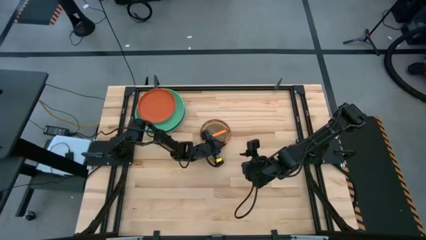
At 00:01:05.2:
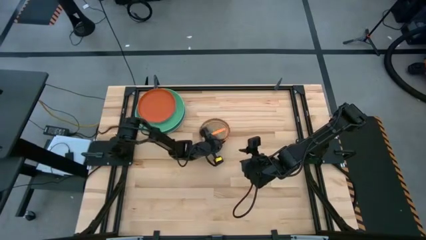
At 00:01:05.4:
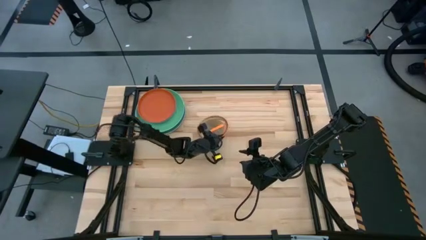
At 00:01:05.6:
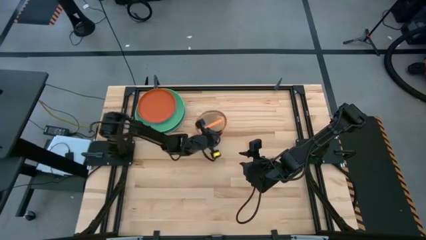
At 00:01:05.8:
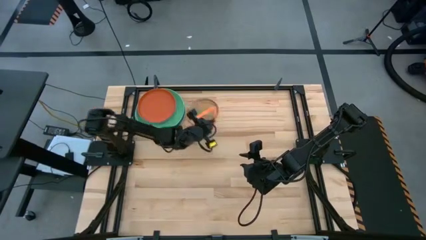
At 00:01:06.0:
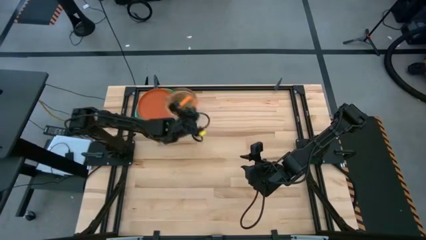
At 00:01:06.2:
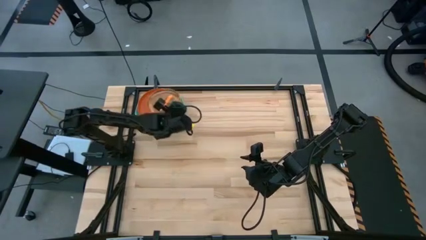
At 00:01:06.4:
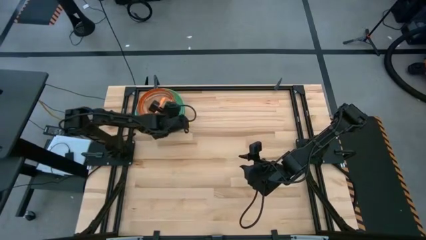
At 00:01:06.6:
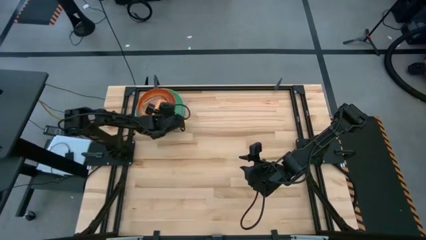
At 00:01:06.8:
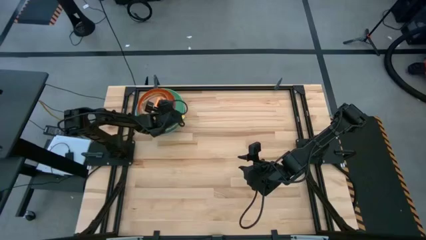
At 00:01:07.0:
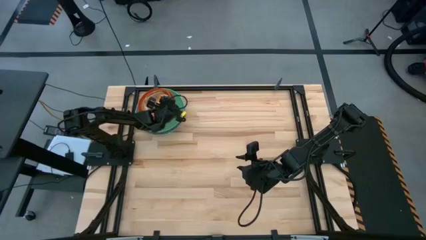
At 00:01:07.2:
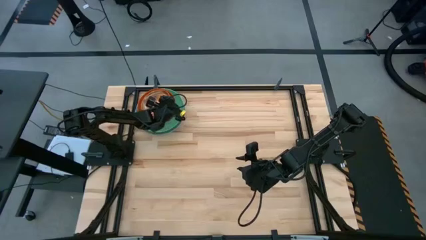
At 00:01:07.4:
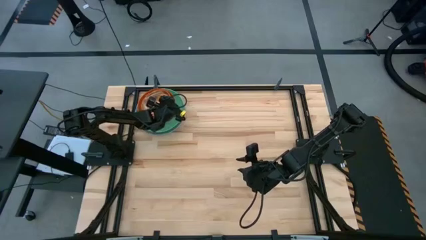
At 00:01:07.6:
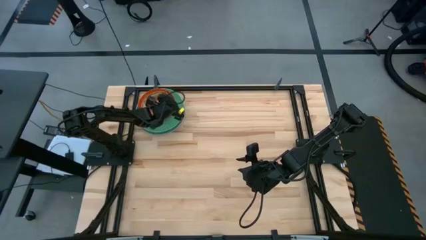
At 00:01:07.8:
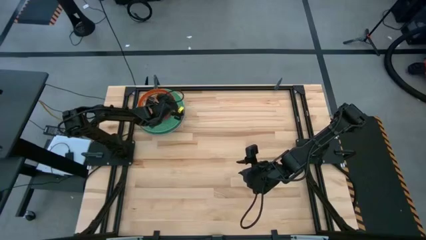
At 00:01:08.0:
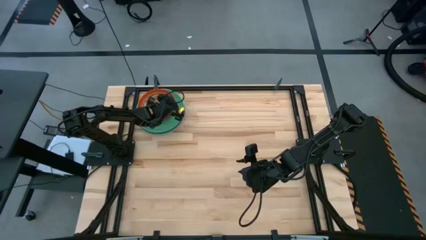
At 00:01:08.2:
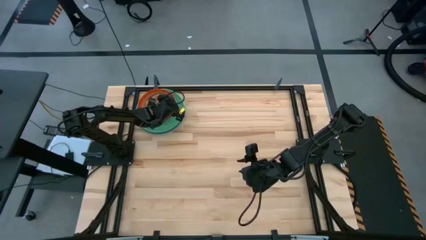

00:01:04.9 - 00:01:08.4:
Task: Stack plastic plates
Stack the small pile of plates on the large pile of plates

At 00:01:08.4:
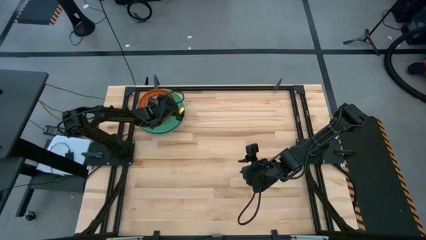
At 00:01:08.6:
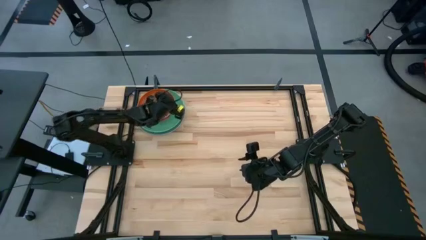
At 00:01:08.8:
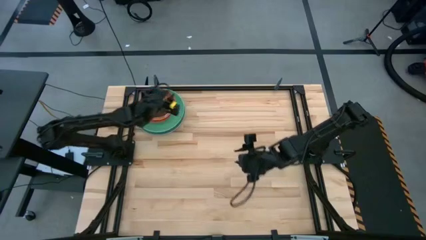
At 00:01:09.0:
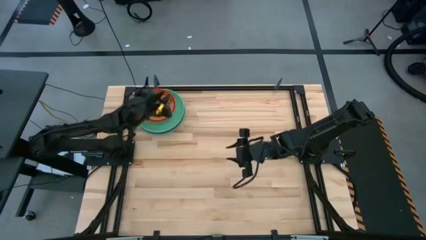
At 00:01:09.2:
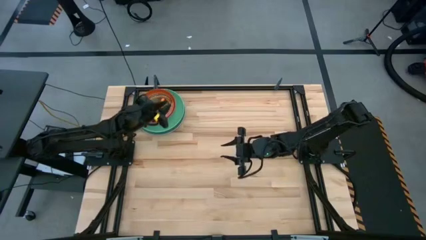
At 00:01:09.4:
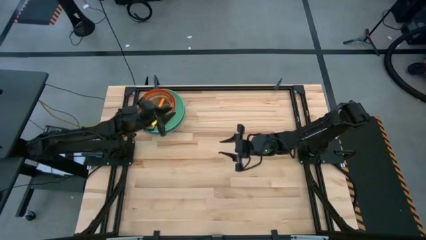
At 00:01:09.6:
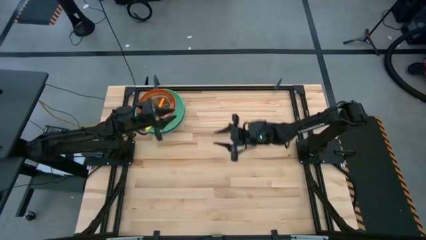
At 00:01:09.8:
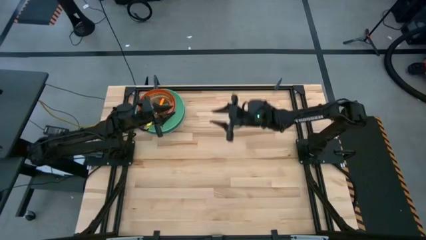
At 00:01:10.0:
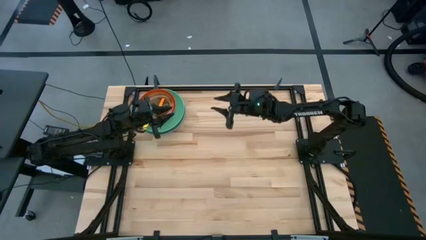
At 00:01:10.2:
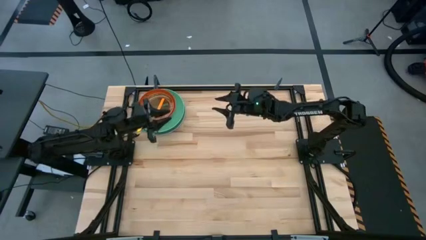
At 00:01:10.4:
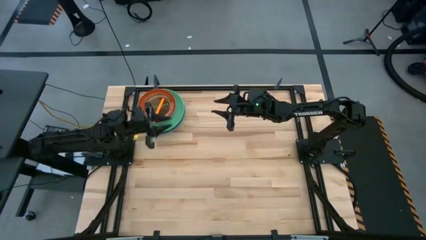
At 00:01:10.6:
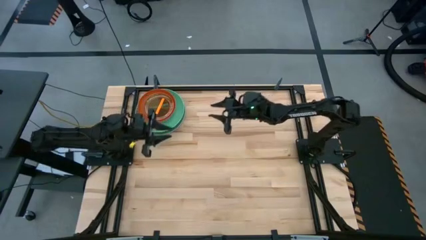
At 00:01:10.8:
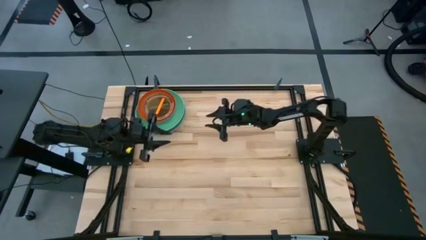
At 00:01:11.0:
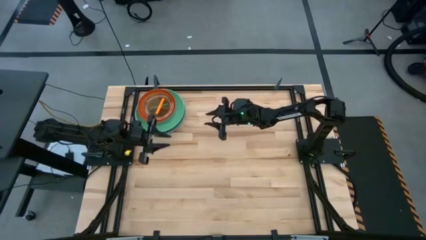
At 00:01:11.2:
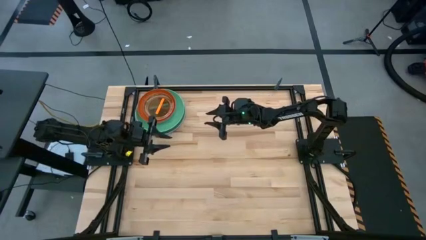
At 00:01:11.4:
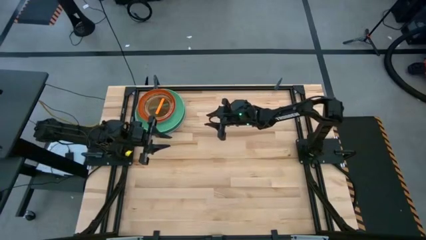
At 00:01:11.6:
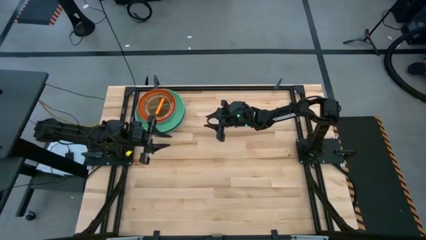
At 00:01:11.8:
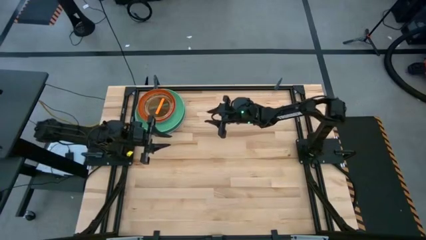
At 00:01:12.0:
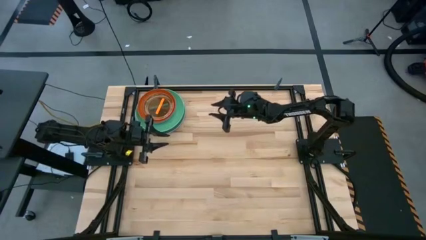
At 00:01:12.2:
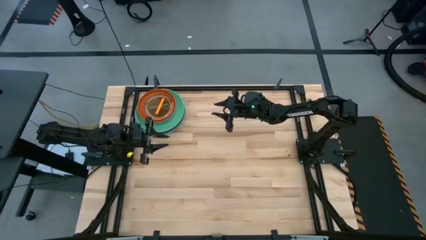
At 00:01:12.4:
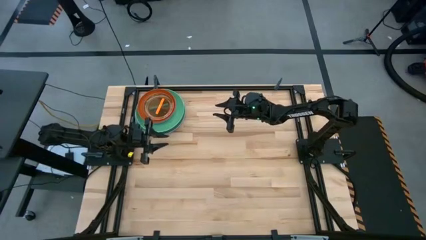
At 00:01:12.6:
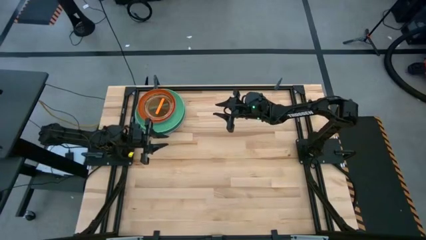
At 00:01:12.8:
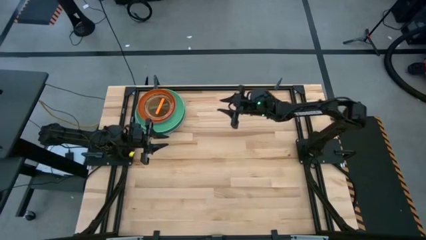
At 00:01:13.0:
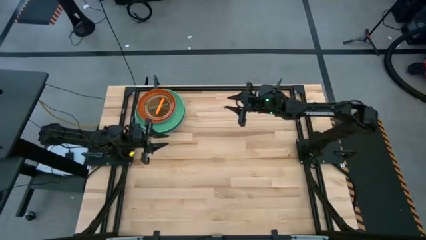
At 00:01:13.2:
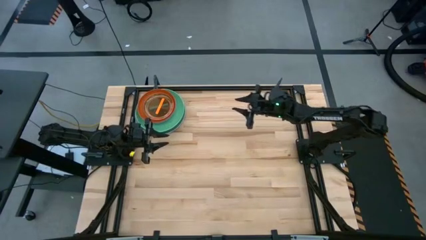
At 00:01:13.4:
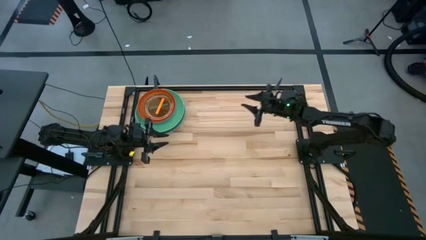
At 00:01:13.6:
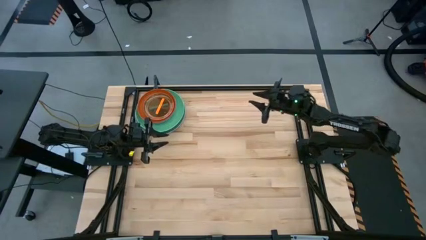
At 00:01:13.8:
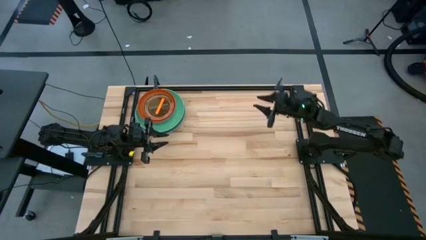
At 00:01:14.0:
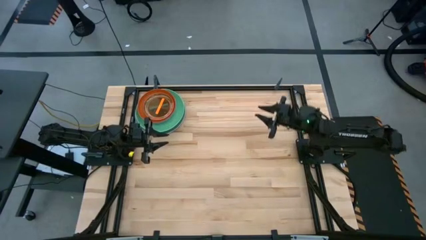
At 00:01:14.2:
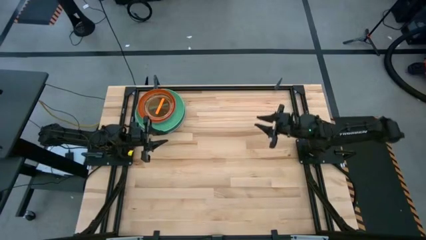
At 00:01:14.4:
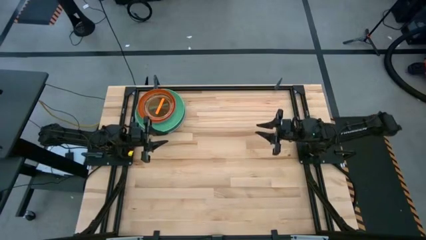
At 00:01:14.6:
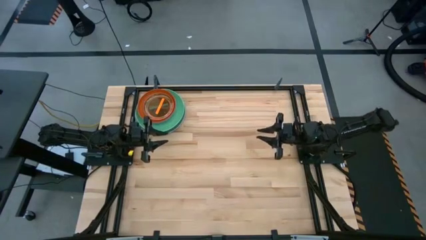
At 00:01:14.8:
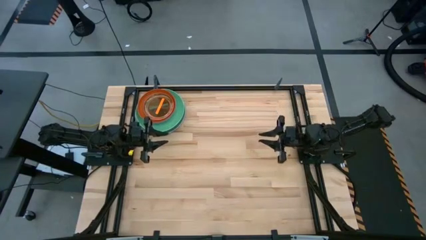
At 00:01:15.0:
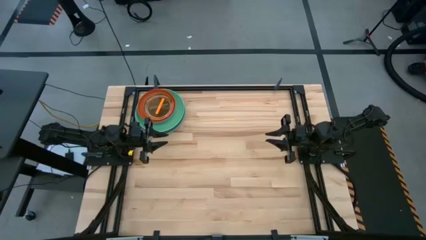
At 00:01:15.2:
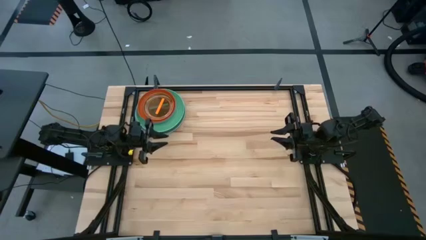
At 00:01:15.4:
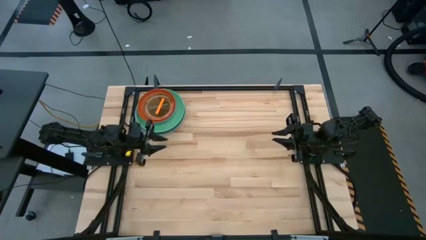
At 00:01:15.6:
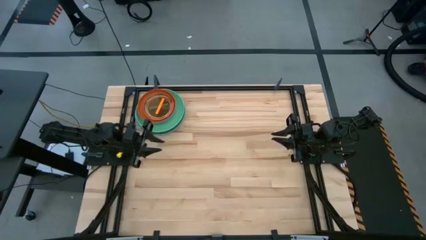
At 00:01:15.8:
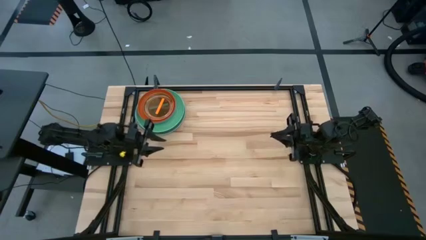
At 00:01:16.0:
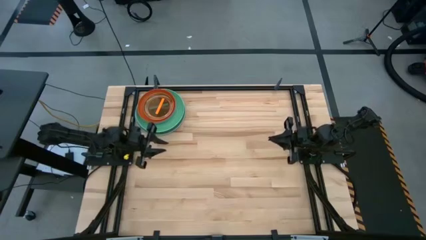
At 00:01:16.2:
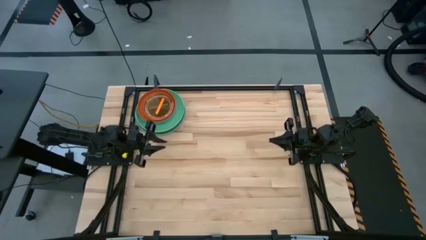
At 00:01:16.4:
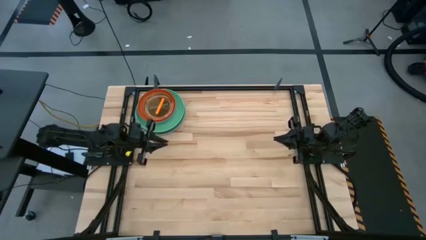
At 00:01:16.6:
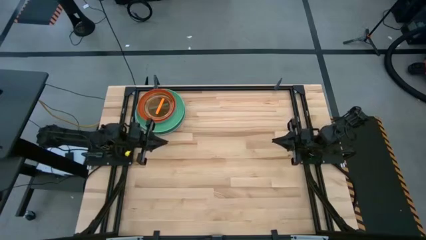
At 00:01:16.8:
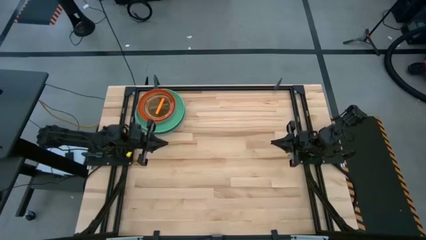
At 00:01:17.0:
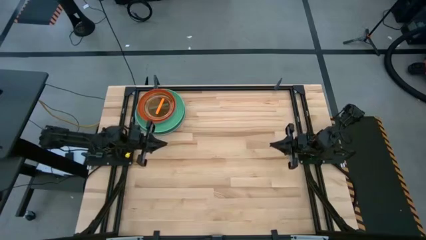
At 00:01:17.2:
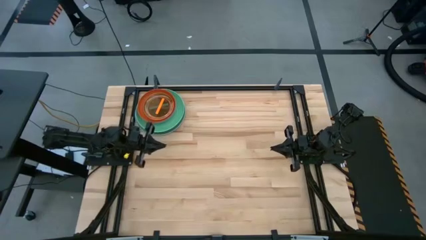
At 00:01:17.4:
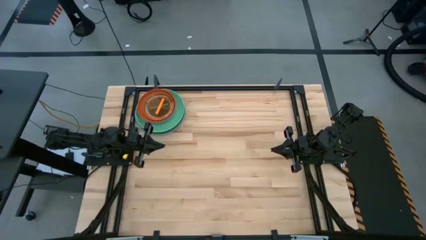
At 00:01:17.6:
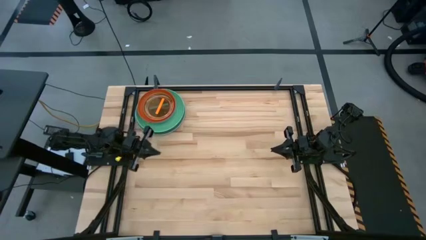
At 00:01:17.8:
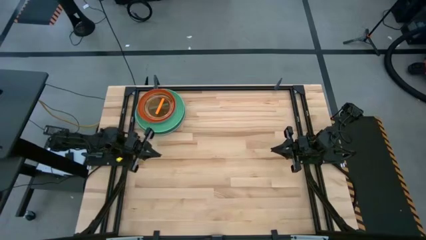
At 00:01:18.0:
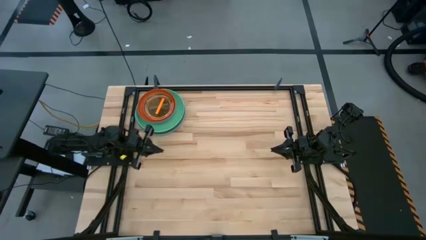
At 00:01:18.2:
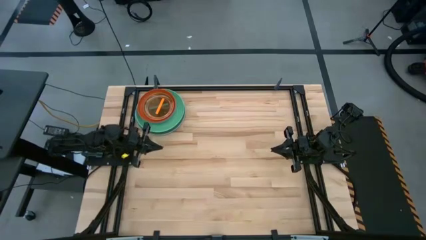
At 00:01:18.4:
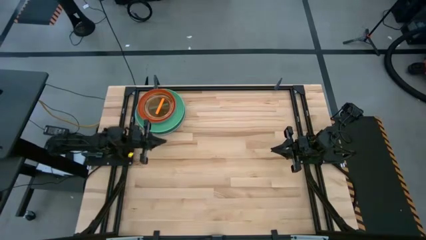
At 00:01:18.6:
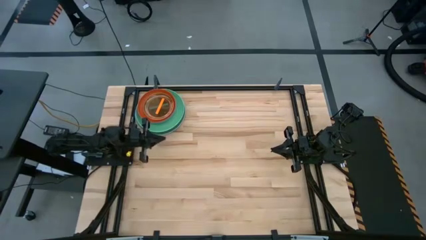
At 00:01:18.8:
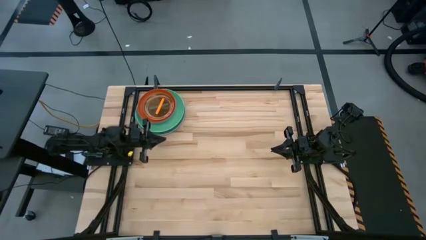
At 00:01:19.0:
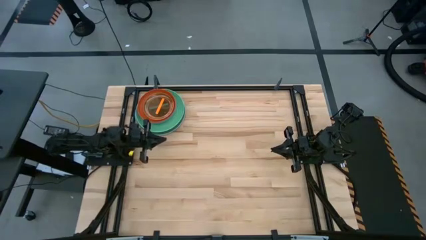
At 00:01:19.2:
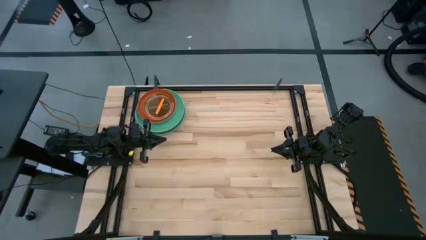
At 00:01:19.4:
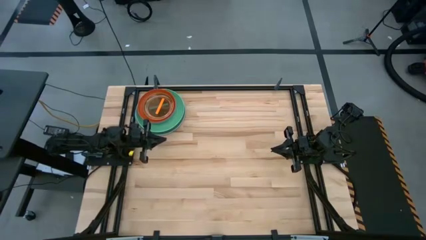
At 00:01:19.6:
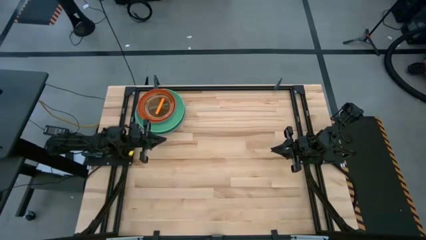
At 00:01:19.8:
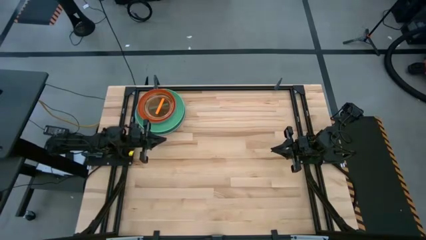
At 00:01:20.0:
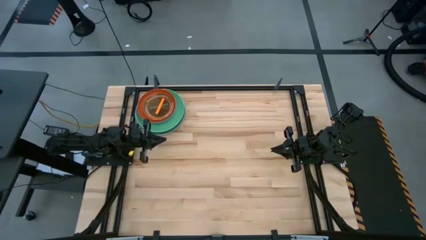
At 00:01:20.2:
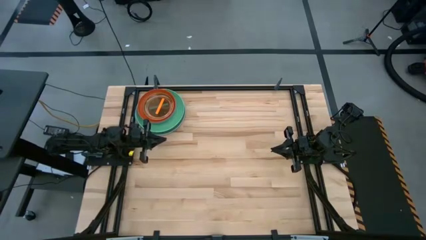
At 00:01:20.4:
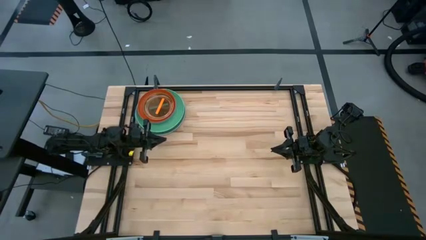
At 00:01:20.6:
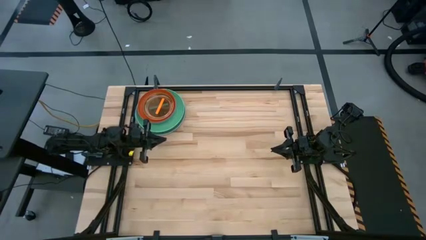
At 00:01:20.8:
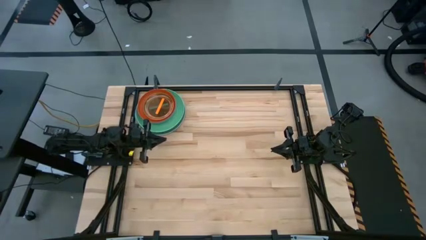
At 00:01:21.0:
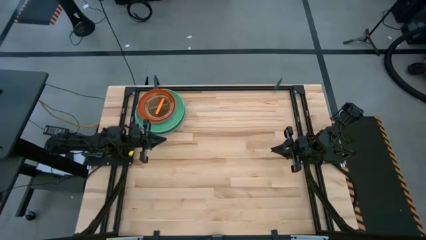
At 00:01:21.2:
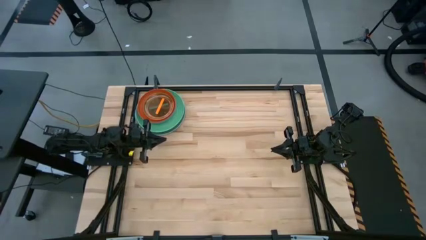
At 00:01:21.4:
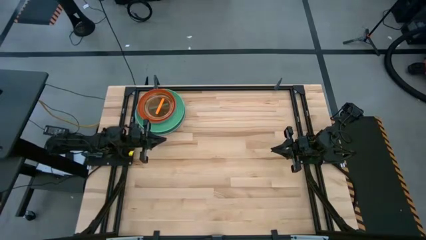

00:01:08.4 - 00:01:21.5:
Return to Home Position
